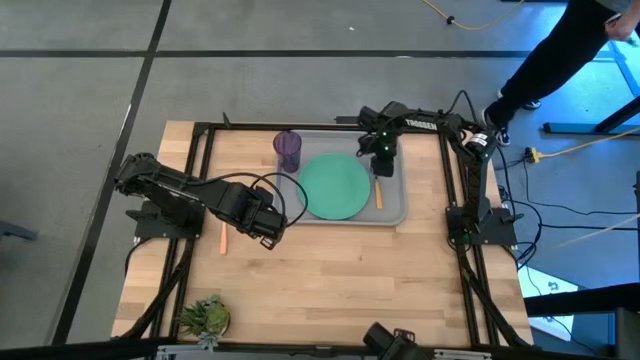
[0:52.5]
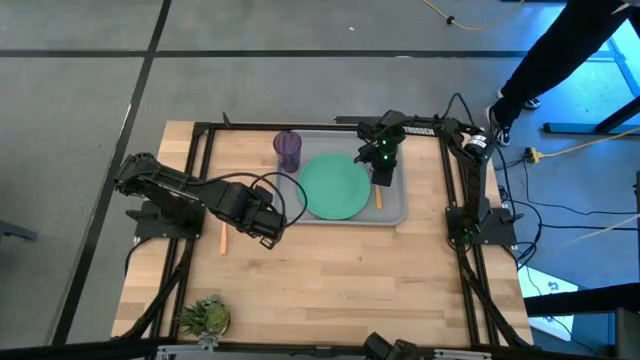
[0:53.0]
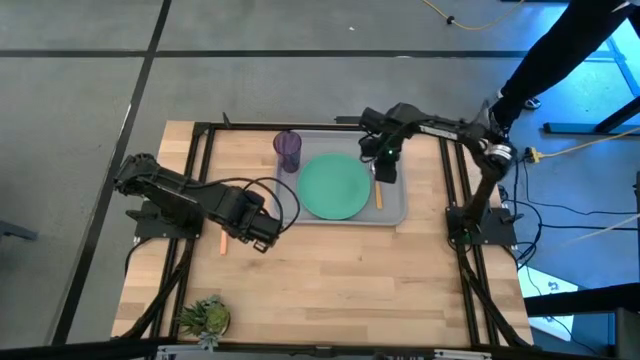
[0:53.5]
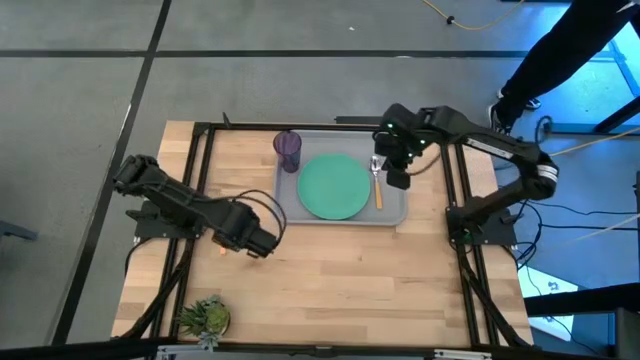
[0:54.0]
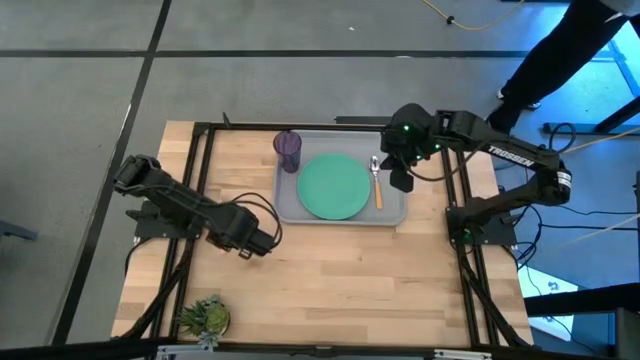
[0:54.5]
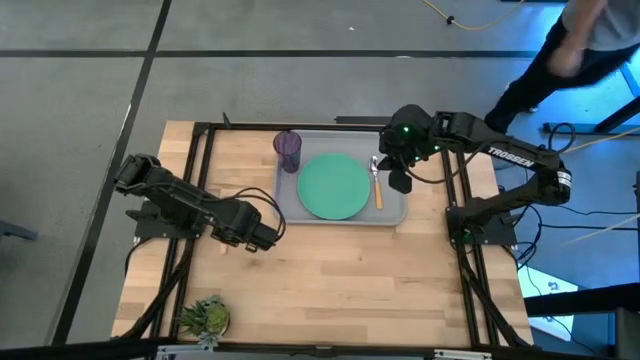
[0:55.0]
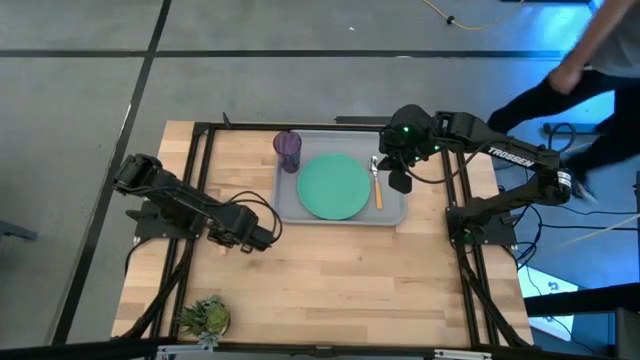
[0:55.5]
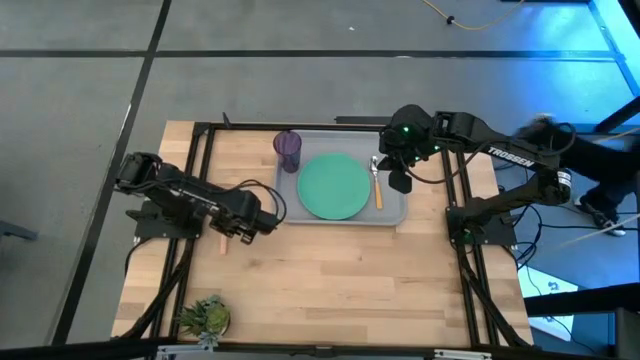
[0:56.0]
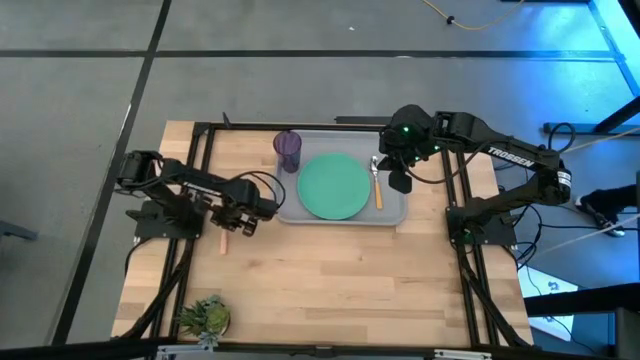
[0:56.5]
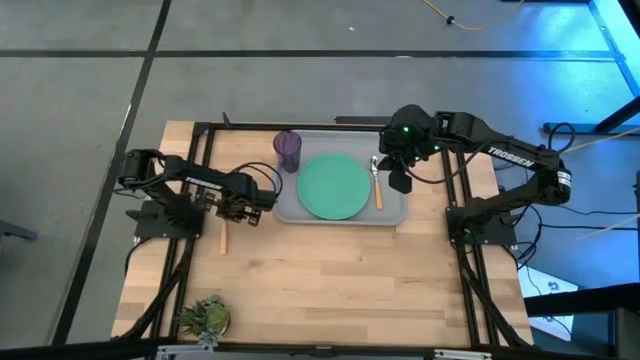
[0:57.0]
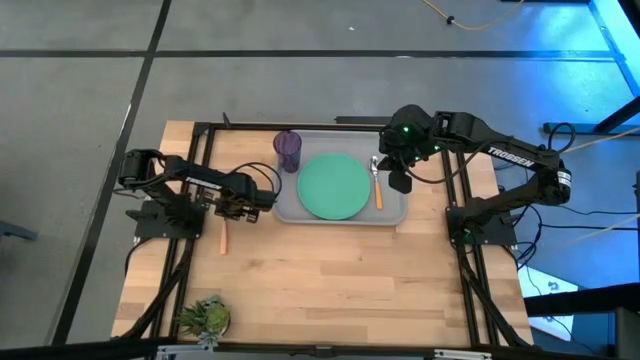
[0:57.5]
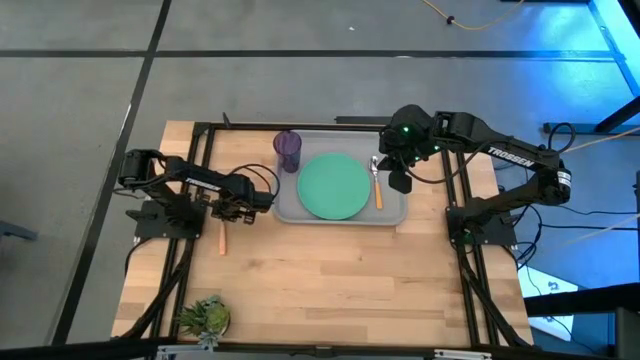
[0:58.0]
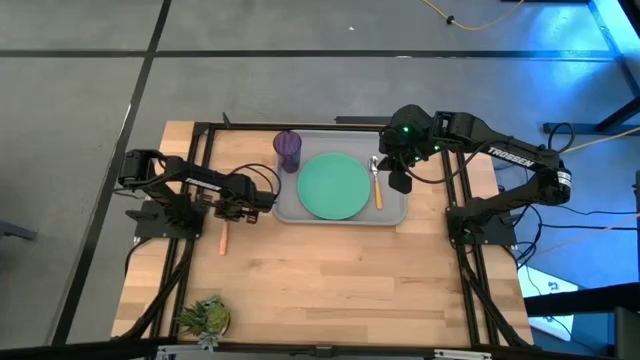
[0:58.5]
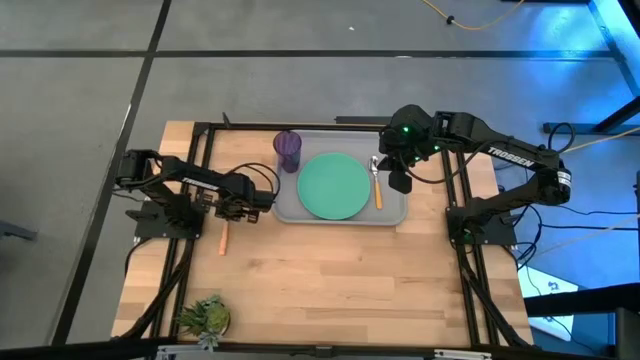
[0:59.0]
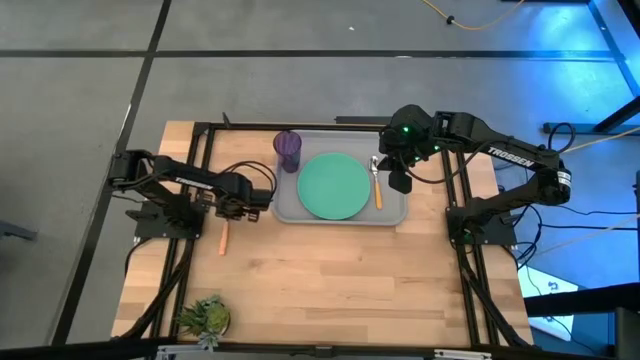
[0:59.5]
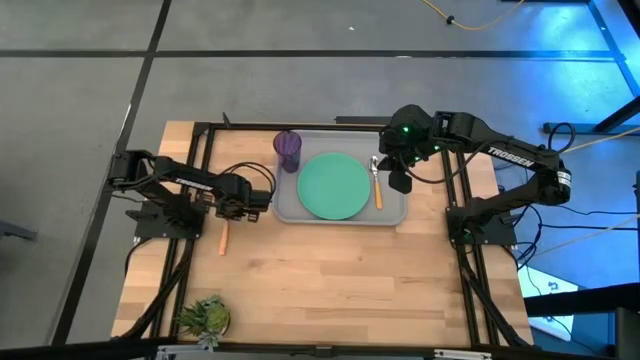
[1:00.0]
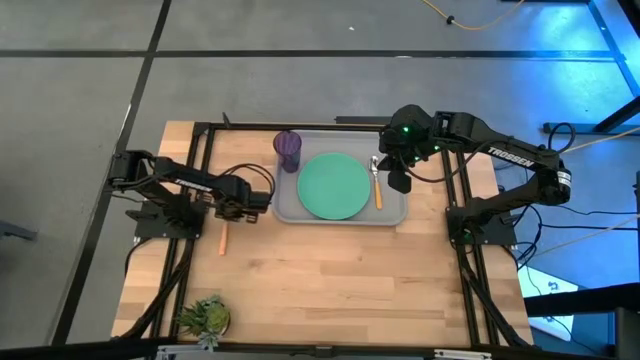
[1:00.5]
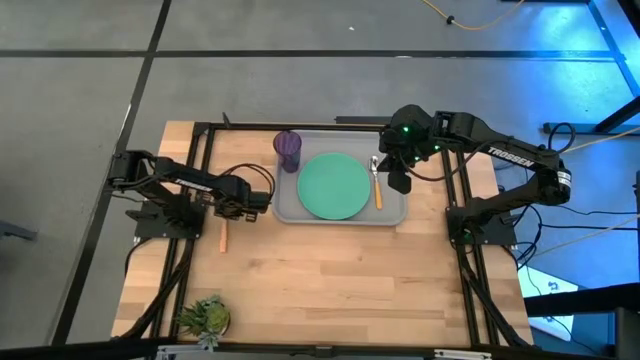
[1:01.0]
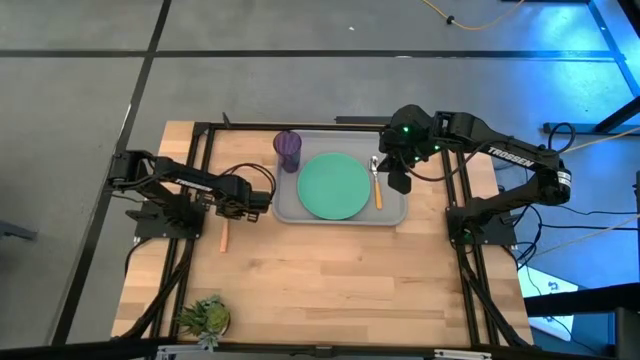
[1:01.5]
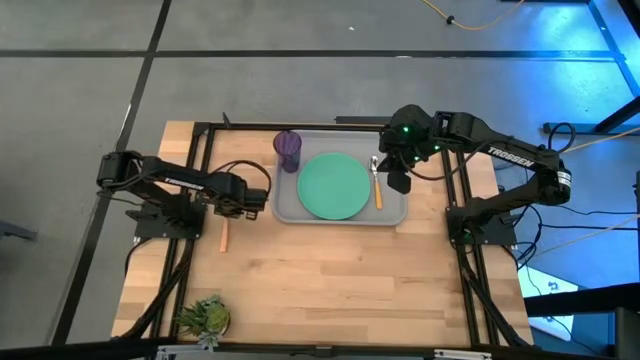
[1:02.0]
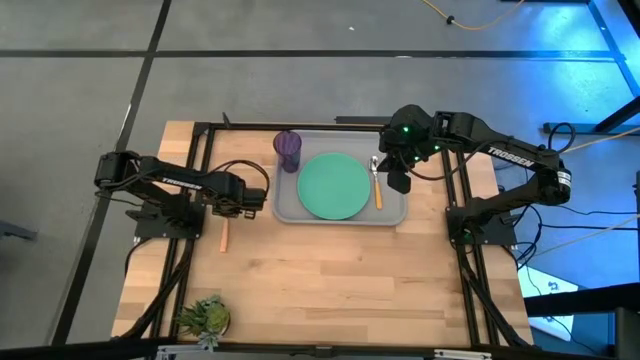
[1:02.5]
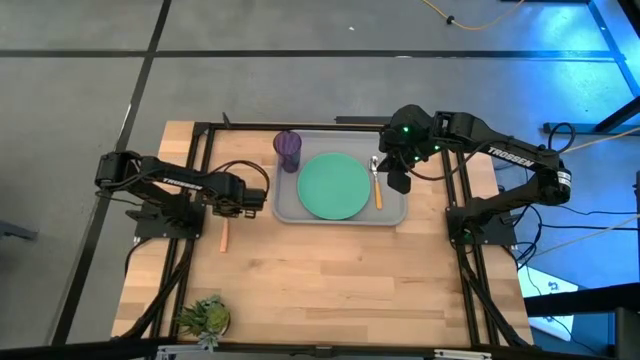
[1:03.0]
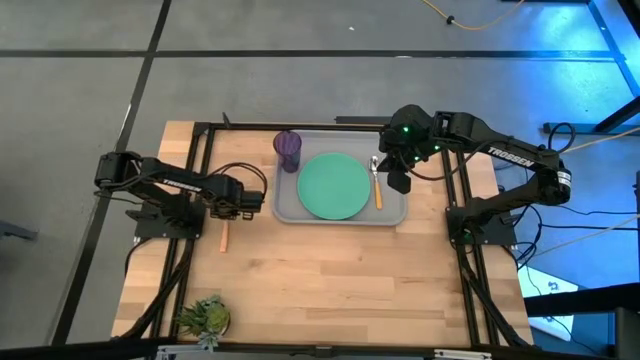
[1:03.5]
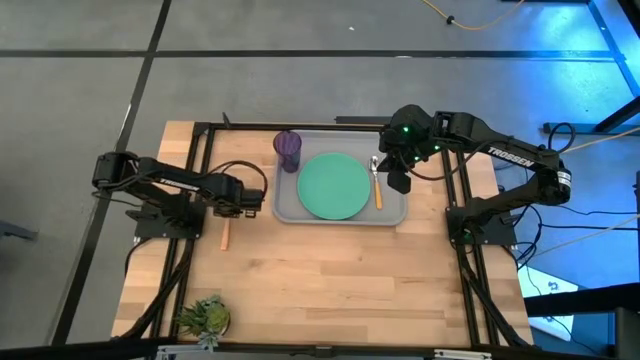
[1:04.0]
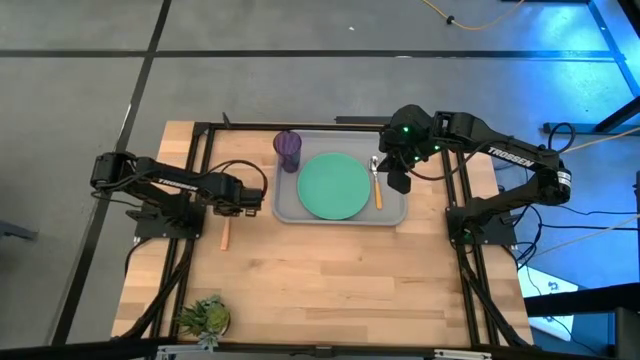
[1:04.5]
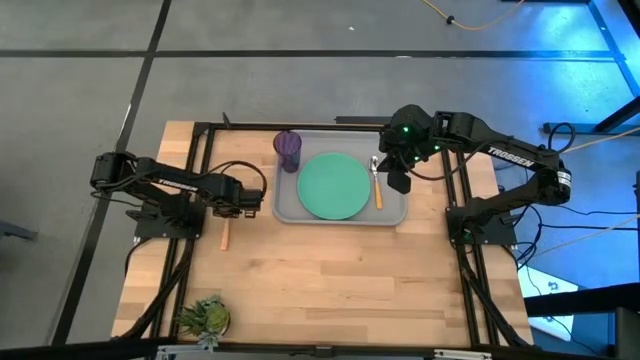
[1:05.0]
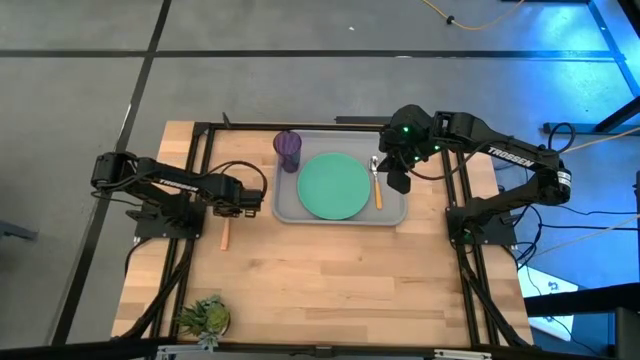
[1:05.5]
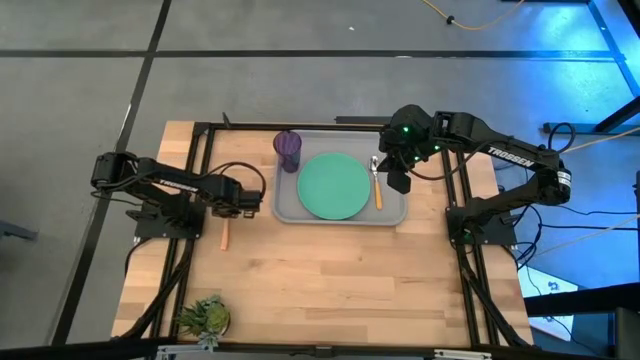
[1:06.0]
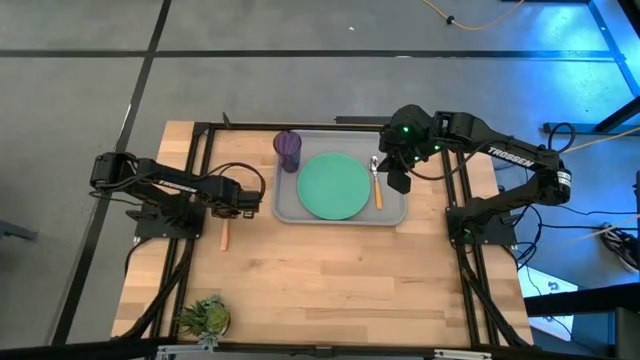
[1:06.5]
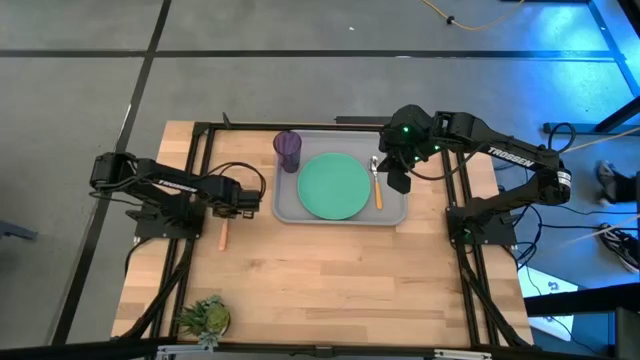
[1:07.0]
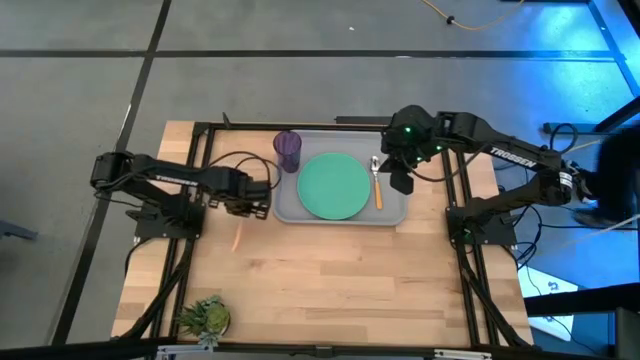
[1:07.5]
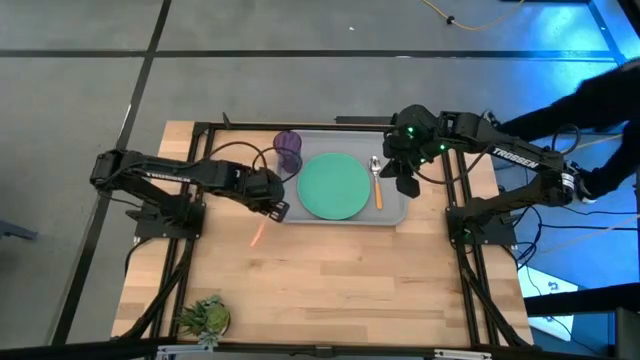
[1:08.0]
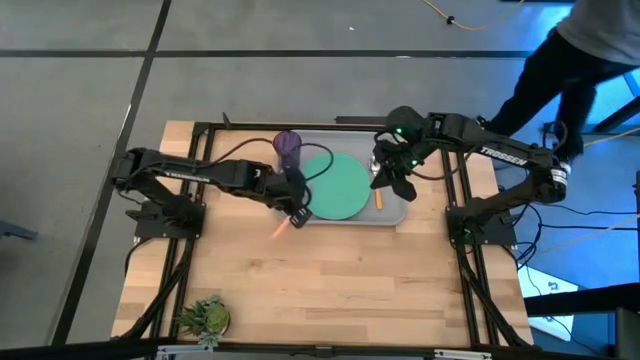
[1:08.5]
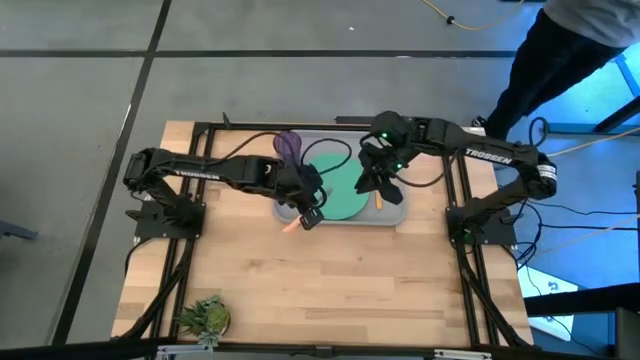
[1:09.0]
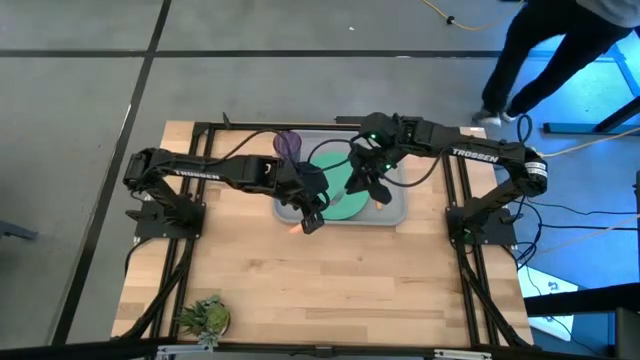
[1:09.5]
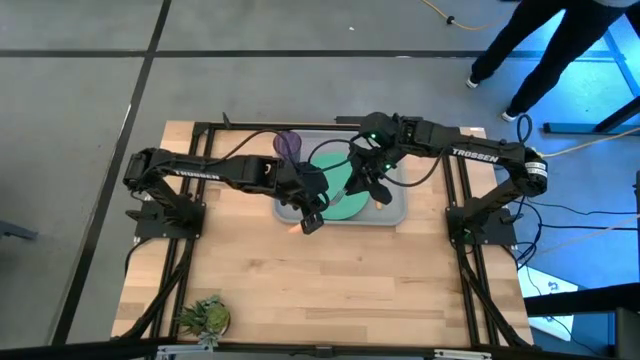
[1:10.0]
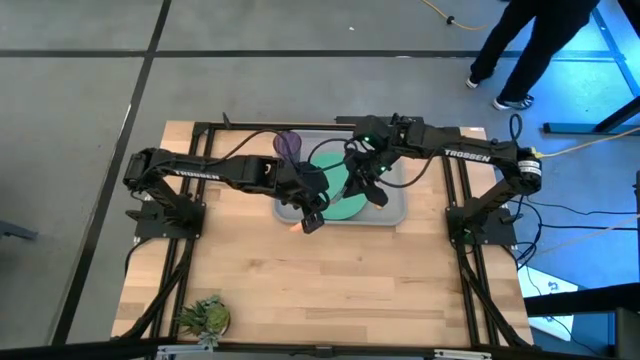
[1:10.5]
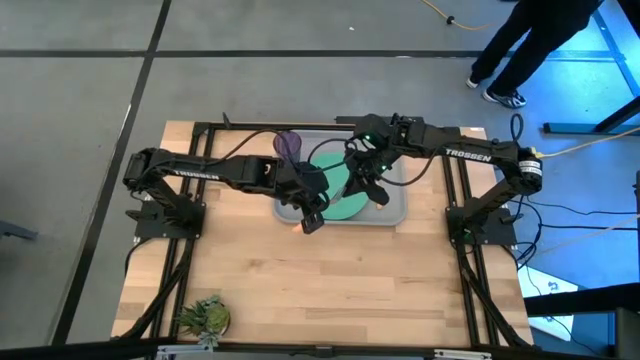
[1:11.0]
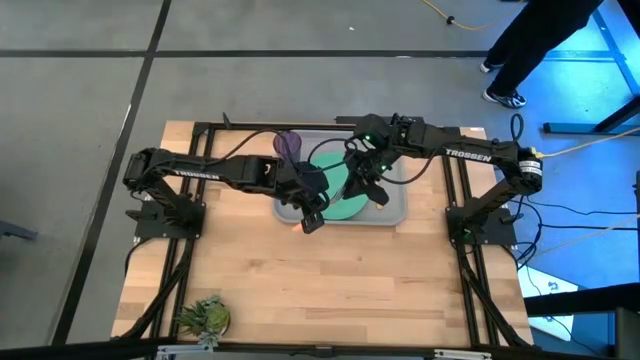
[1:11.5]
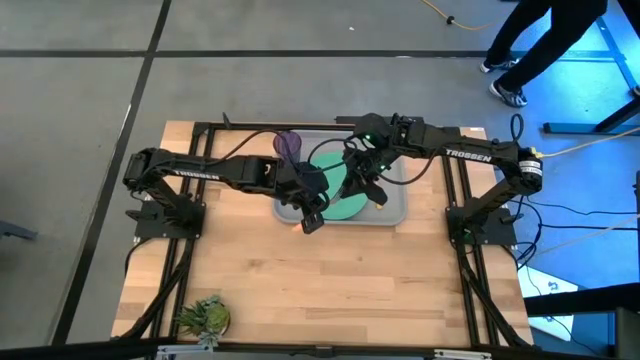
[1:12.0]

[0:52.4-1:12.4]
Task: Pick and place plate/cup/fork/spoon on tray
Put the yellow fork on the gray tray to the right of the yellow spoon

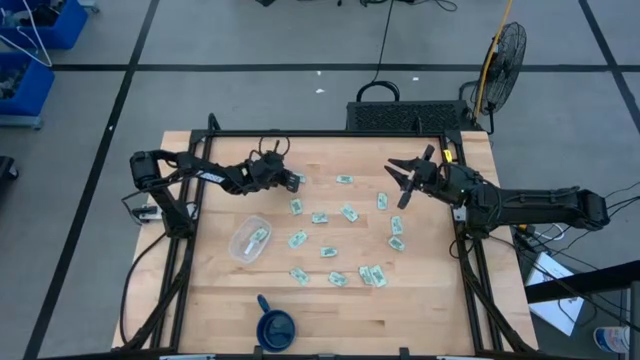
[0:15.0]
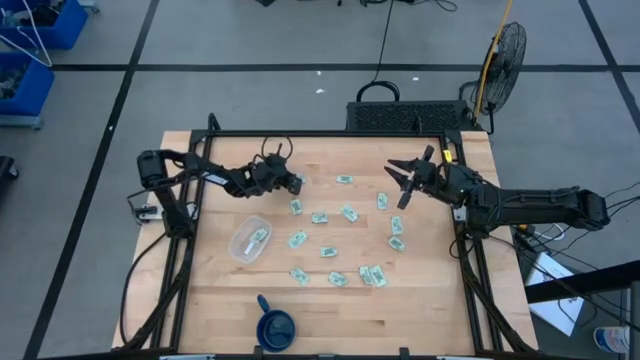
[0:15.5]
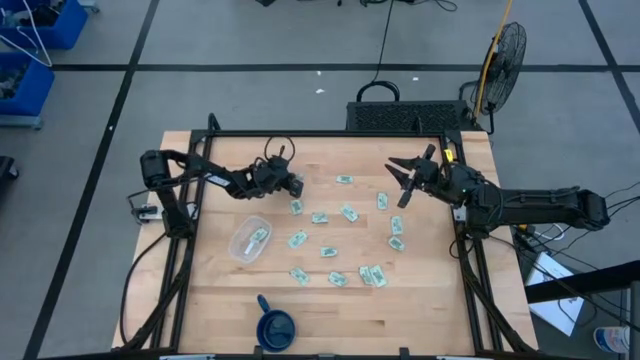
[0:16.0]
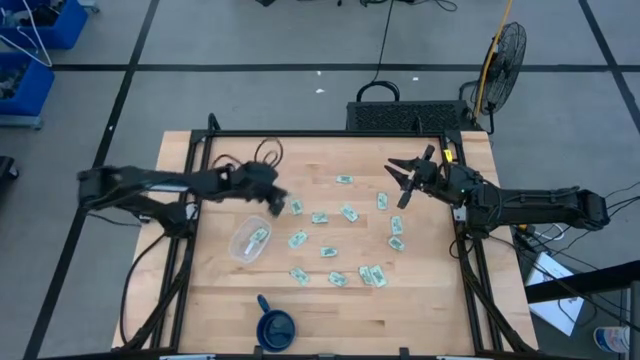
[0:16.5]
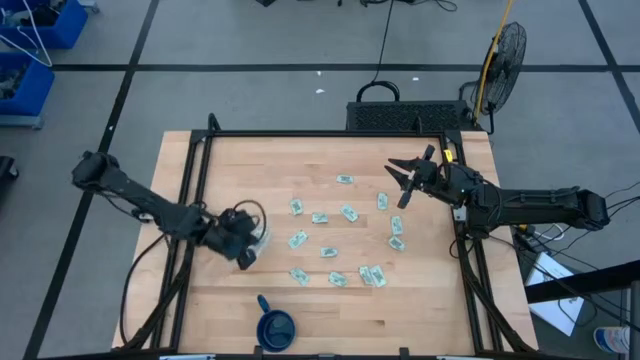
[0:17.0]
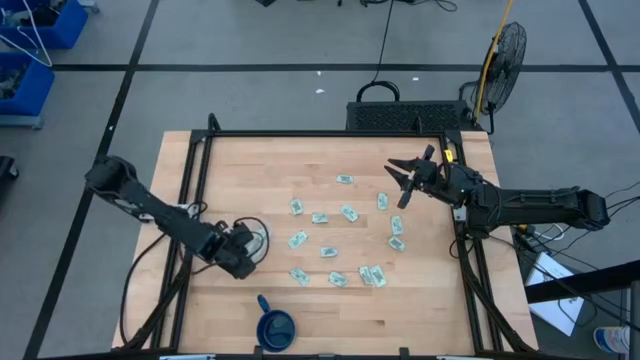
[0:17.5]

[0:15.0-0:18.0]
Task: Pick and place Stevia / Truvia into bins
Put the stevia packet into the transparent container
